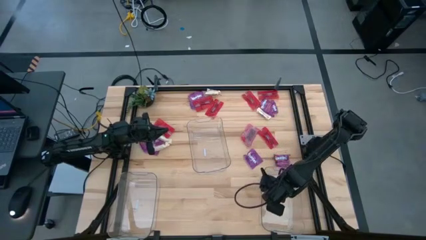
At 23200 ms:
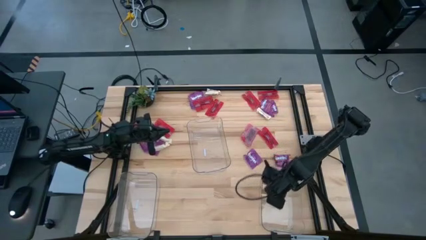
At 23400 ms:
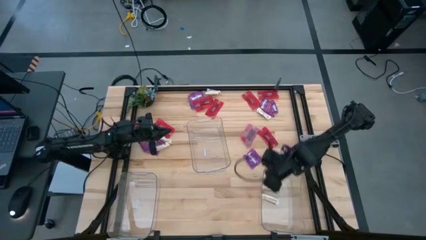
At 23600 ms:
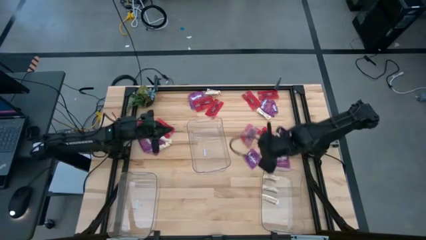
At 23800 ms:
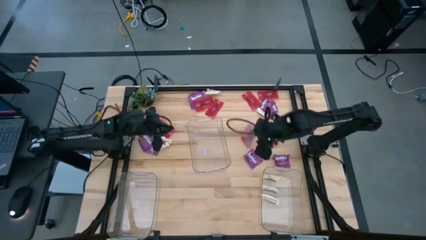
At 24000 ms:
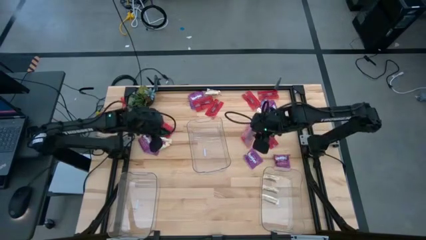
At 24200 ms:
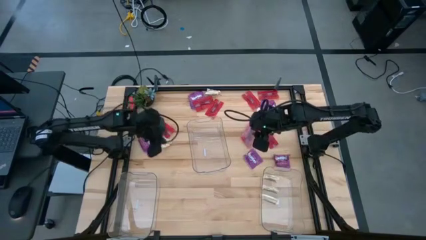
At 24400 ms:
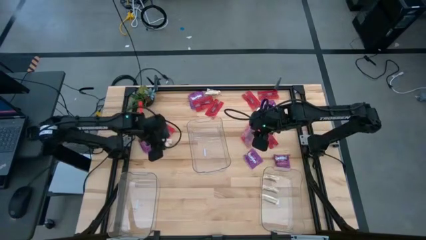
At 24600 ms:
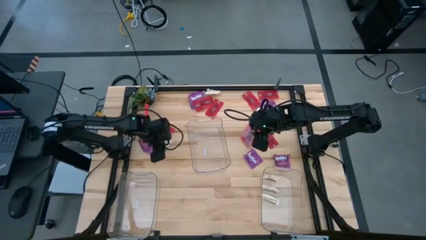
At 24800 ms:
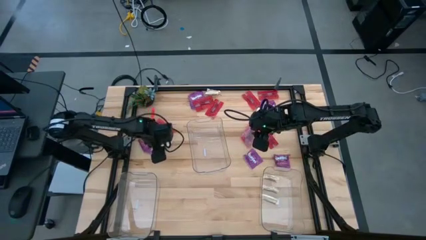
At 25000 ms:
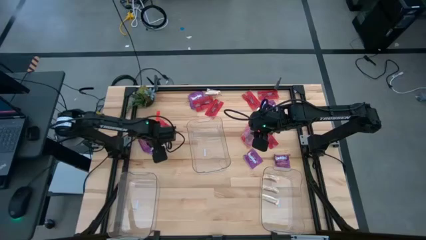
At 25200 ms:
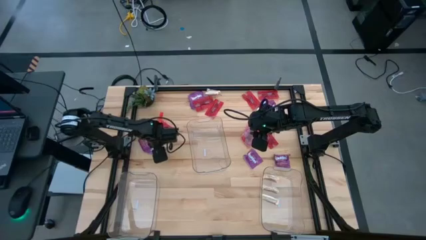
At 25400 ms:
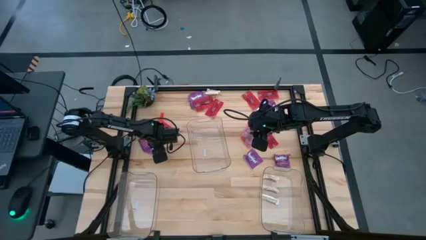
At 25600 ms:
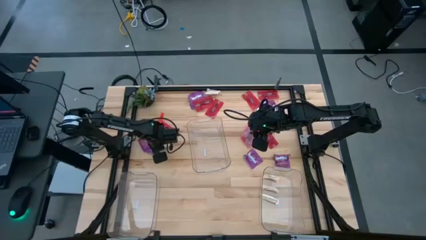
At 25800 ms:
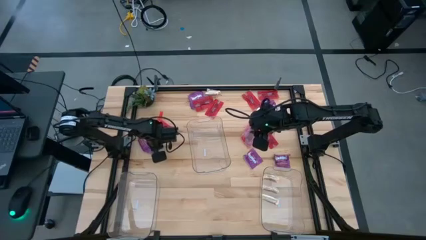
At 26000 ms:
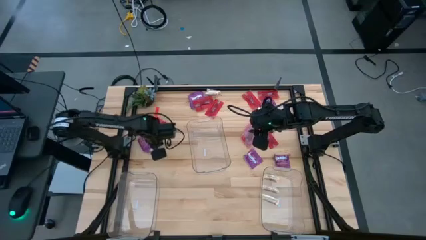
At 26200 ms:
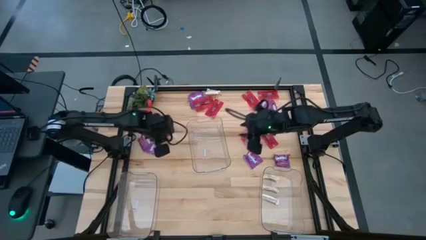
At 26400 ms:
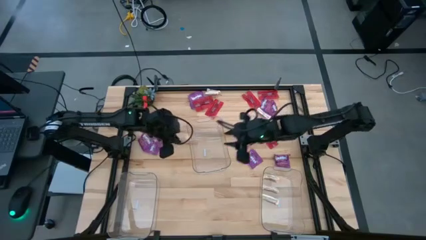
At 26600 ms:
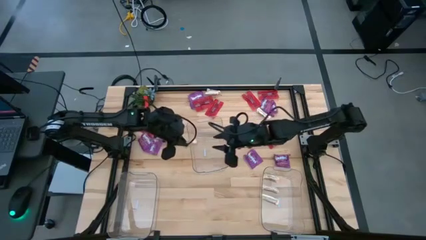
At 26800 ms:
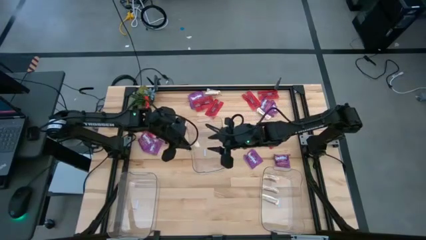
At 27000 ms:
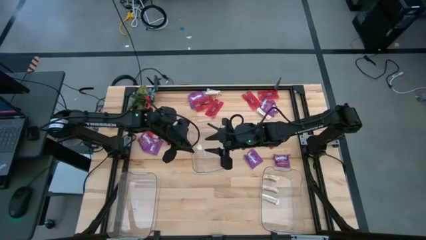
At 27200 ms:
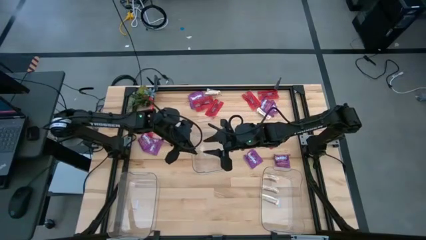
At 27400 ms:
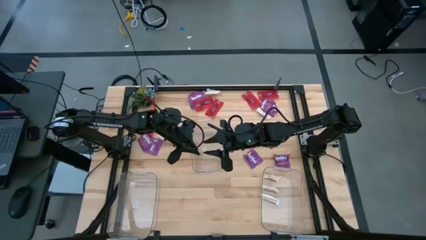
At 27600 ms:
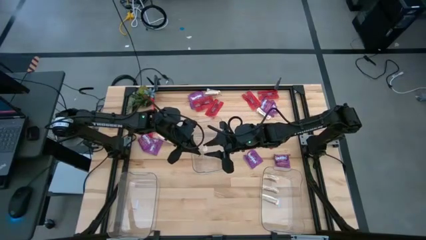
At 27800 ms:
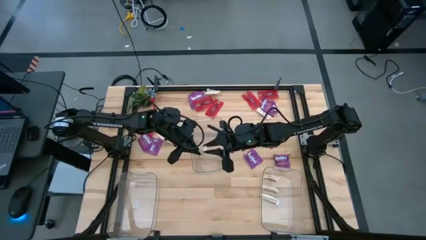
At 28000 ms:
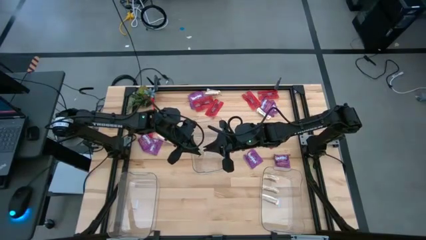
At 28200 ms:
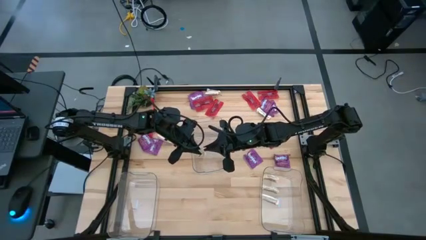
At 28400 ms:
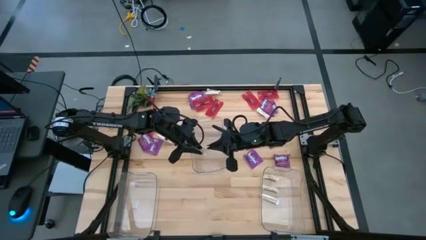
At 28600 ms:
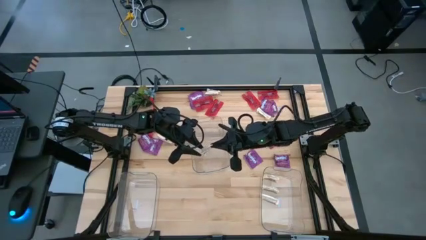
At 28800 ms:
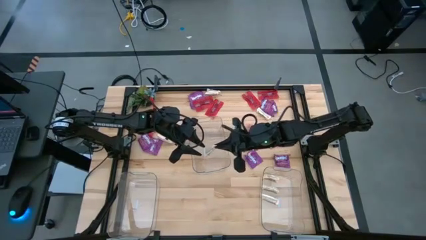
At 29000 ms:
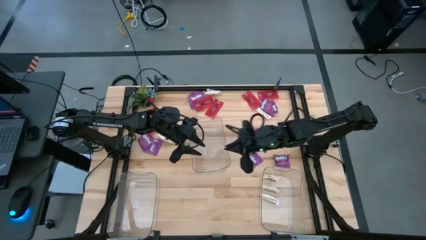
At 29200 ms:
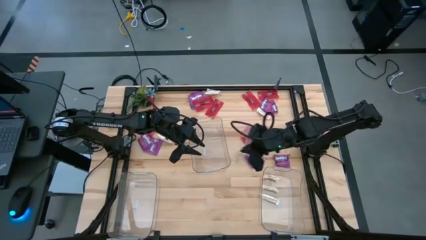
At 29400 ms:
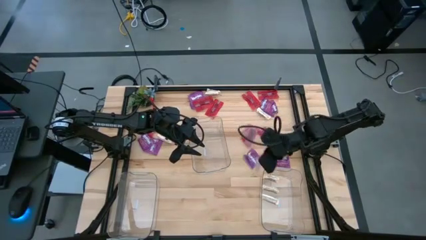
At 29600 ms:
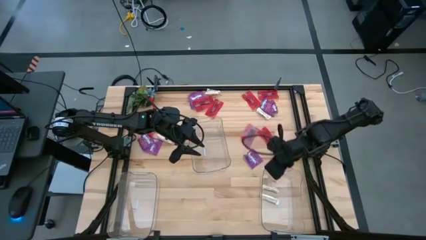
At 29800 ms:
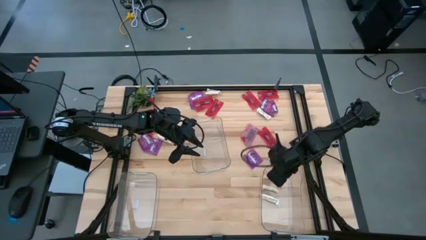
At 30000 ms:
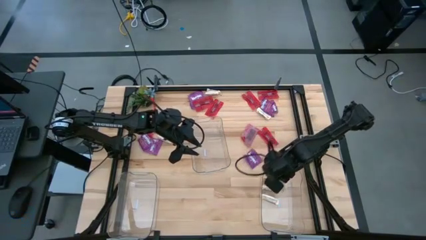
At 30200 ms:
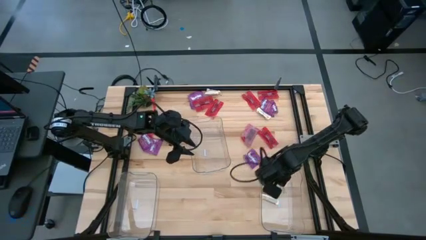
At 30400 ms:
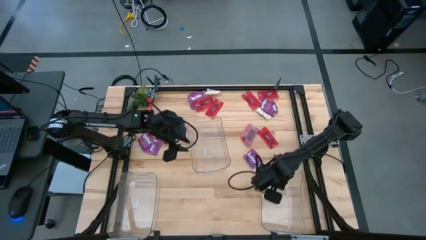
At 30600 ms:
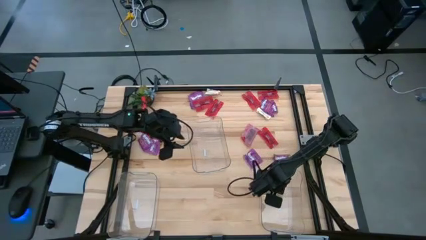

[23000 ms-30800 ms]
Task: Sort candy
Put the white chocolate bar into the right transparent bin

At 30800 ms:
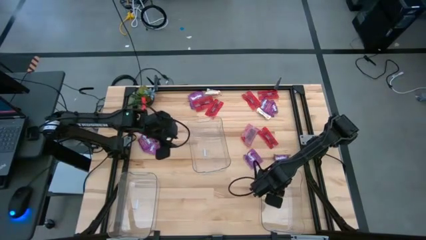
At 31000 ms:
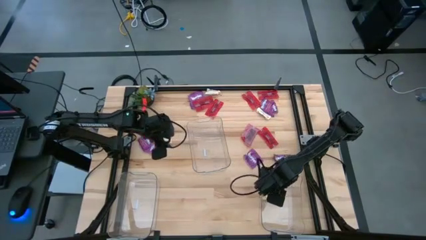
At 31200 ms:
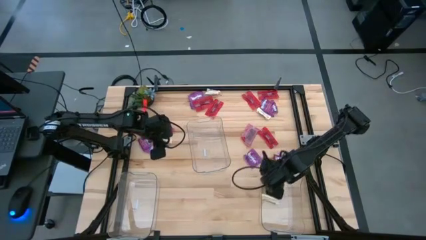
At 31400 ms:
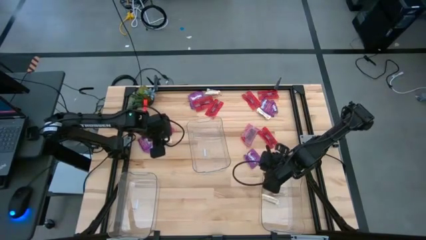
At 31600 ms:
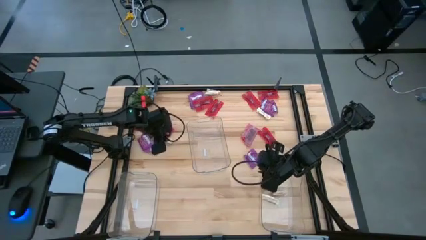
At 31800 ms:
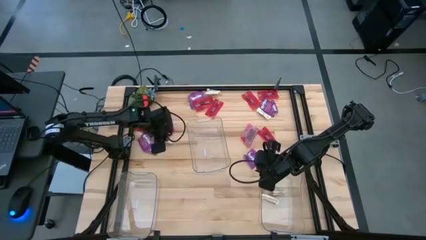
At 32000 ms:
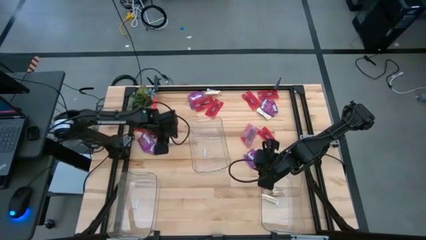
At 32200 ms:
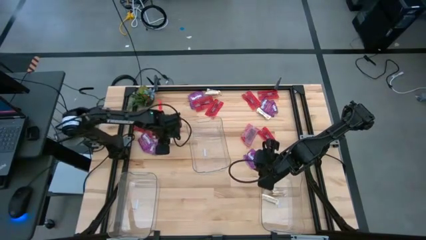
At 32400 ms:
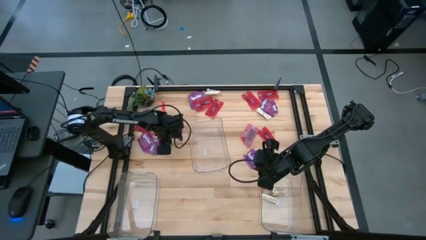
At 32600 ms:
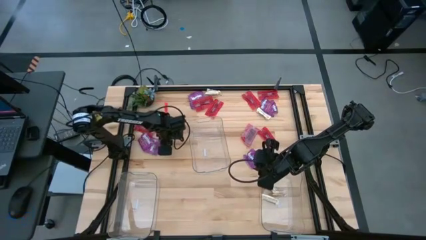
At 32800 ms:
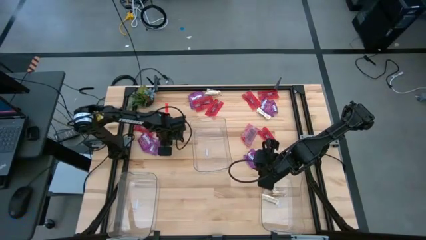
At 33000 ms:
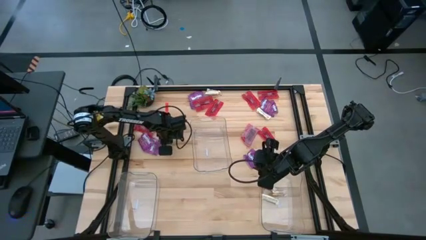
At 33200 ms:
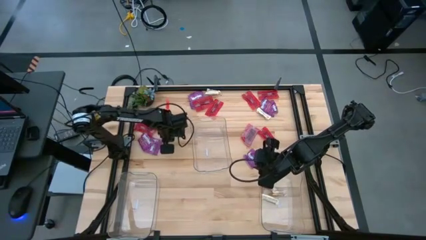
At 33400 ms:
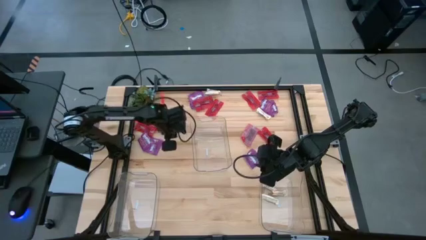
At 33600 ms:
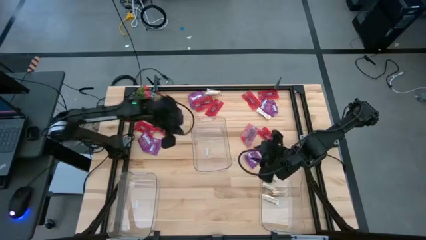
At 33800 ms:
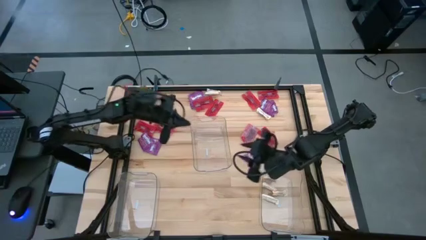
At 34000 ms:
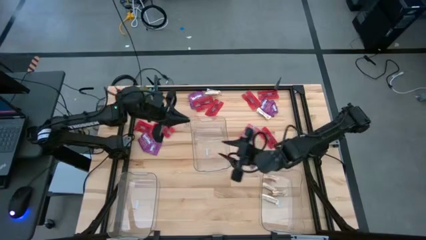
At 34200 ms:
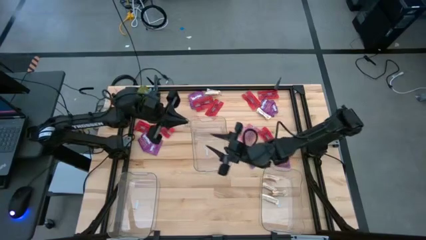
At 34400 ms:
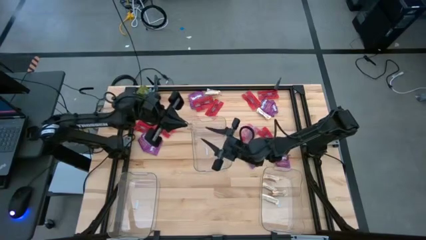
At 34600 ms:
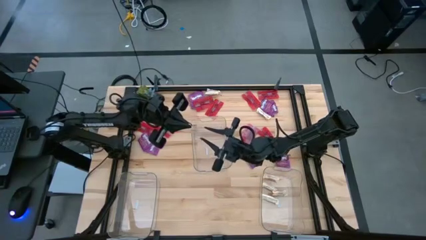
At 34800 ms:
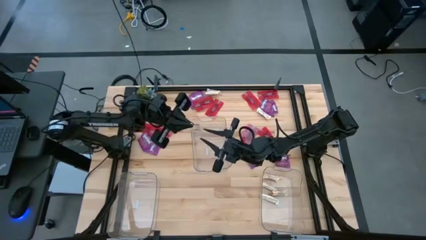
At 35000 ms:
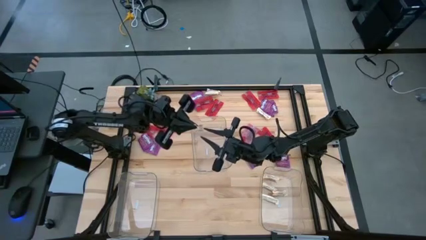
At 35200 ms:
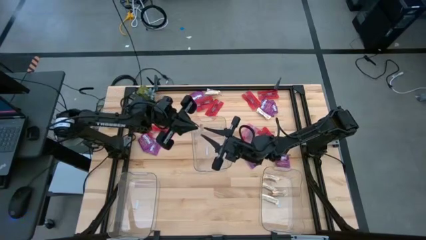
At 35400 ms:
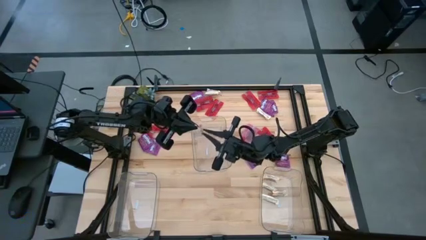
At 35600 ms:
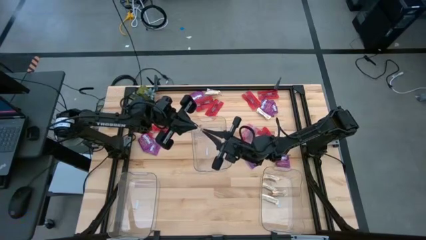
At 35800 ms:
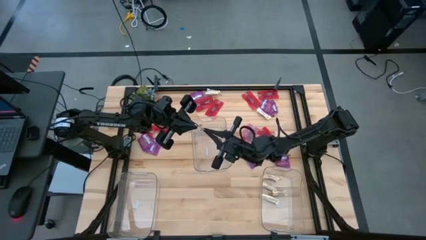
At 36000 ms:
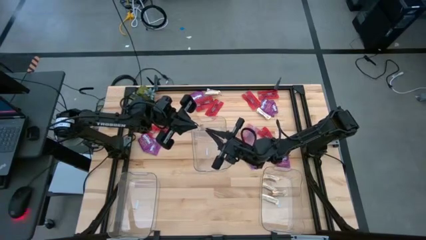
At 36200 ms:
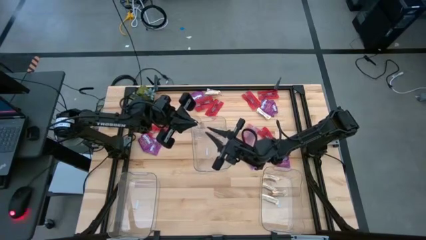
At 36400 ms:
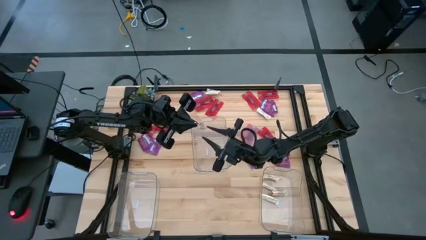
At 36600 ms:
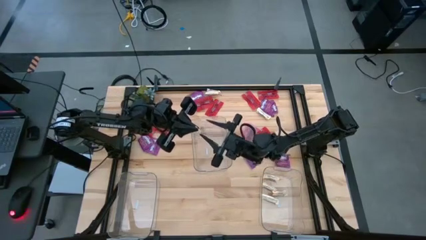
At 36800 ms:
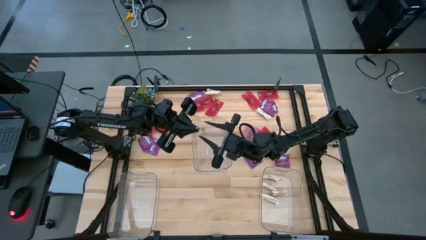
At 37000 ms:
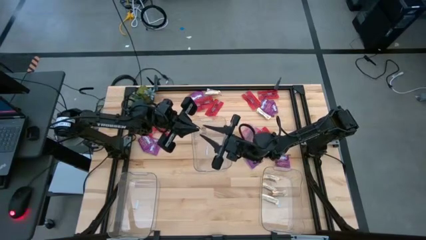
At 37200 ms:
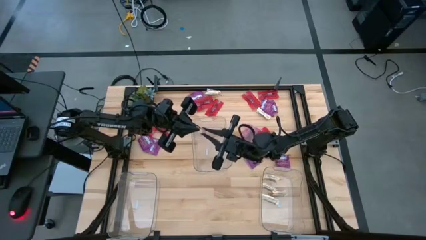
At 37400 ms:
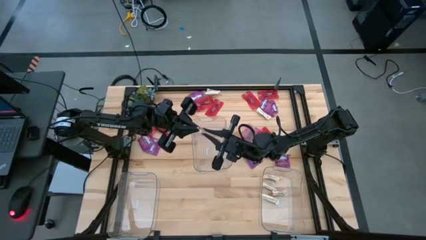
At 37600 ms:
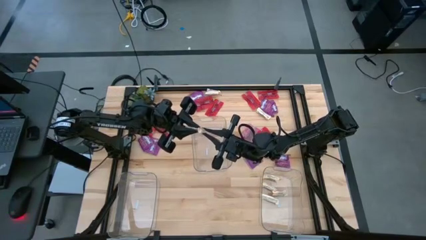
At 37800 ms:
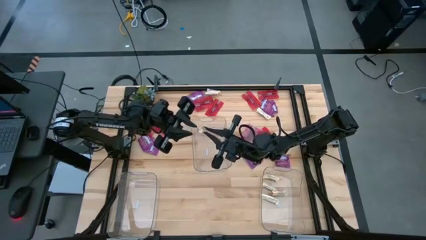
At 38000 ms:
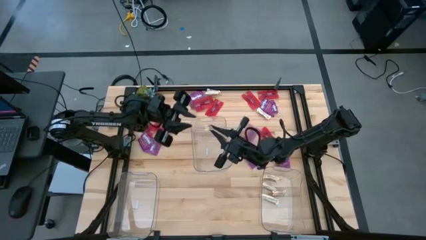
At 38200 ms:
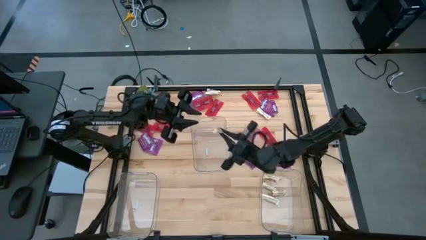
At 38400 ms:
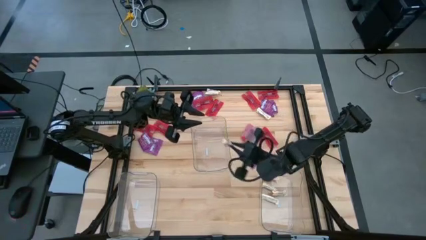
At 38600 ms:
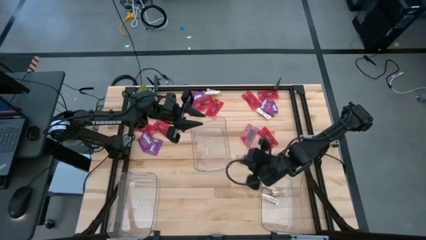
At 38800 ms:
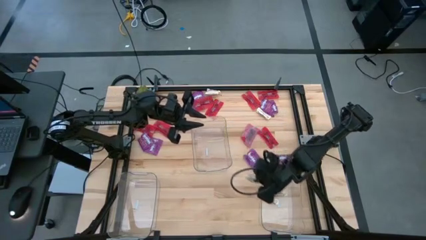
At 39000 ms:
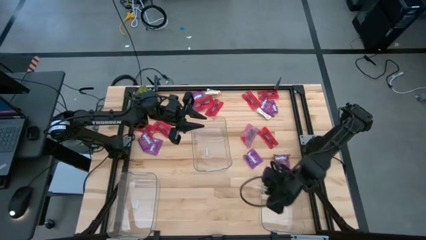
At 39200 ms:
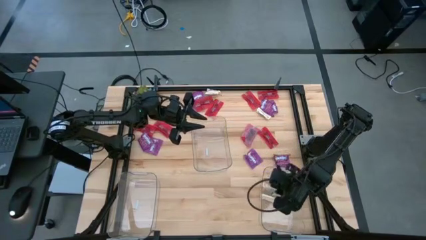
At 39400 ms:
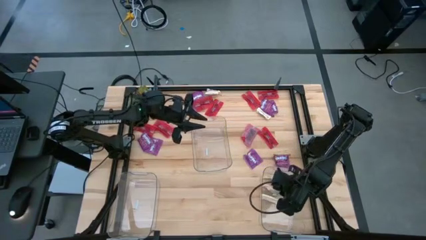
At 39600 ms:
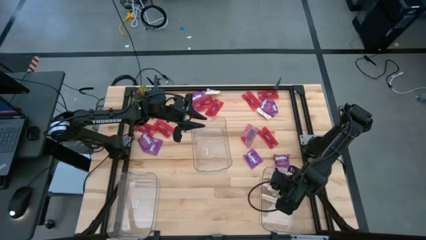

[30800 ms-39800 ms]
Put the white chocolate bar into the right transparent bin
